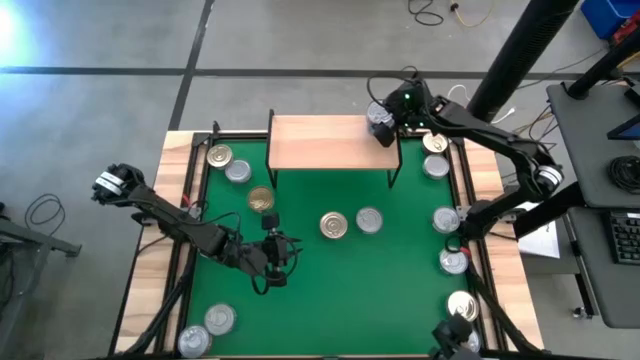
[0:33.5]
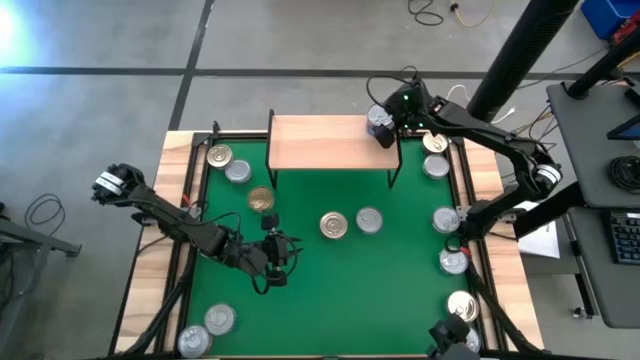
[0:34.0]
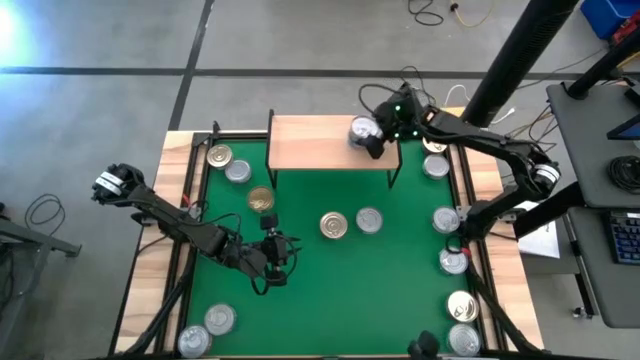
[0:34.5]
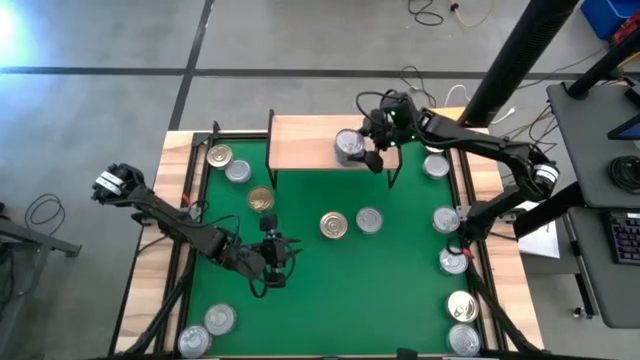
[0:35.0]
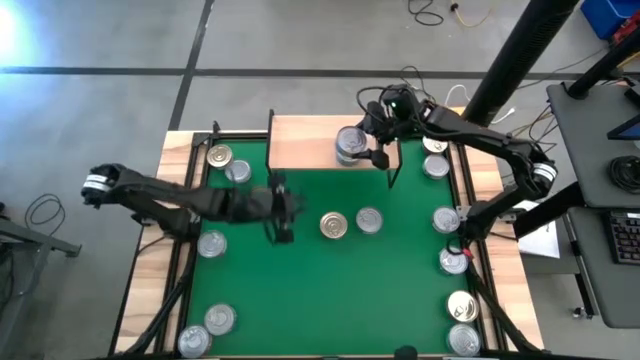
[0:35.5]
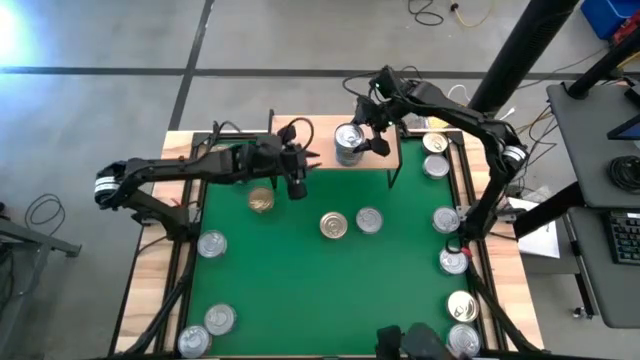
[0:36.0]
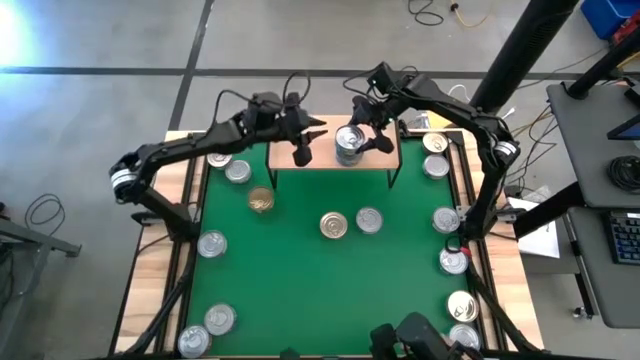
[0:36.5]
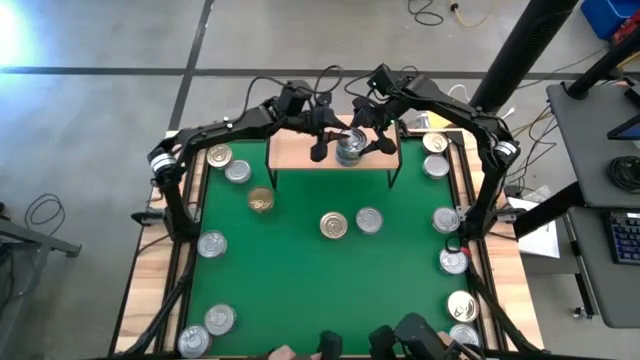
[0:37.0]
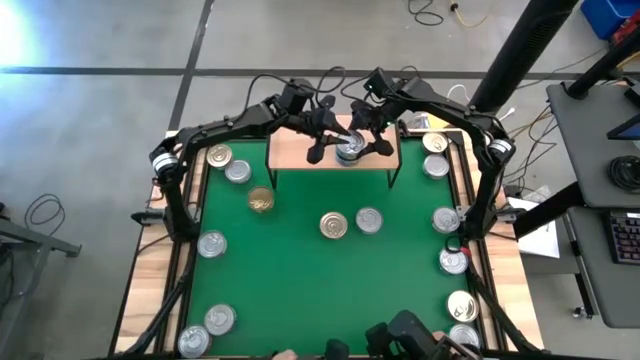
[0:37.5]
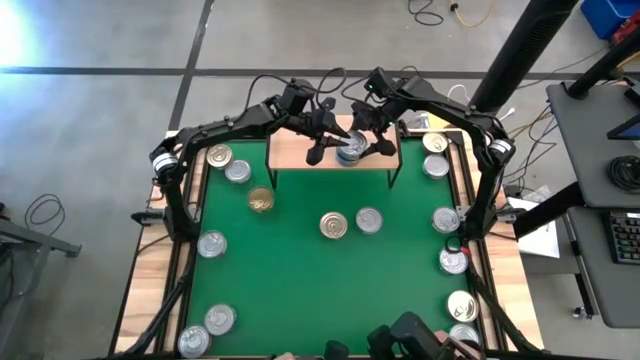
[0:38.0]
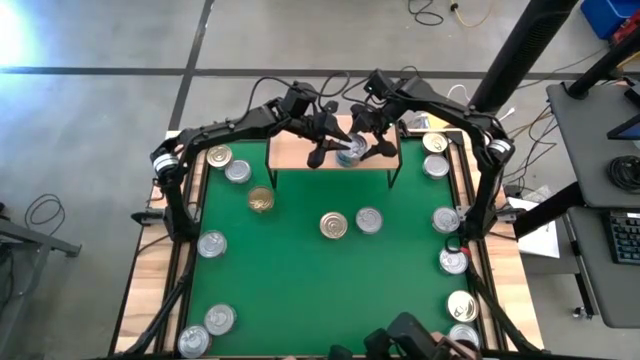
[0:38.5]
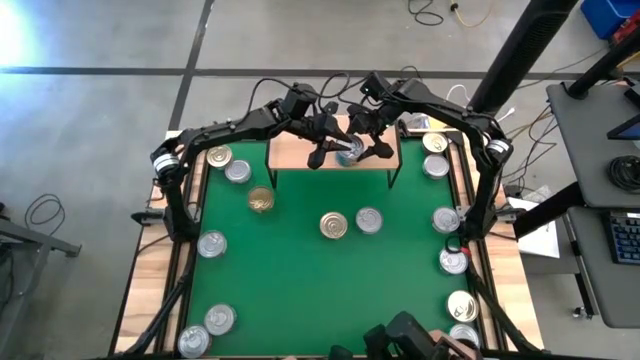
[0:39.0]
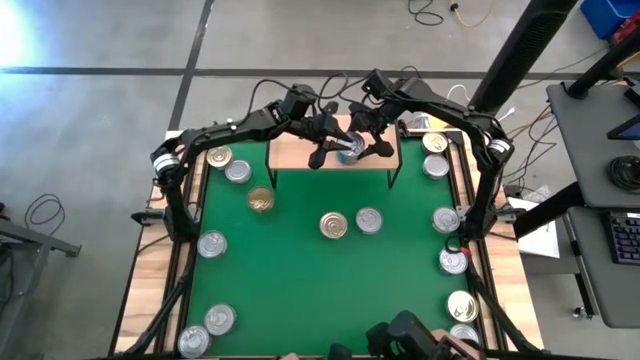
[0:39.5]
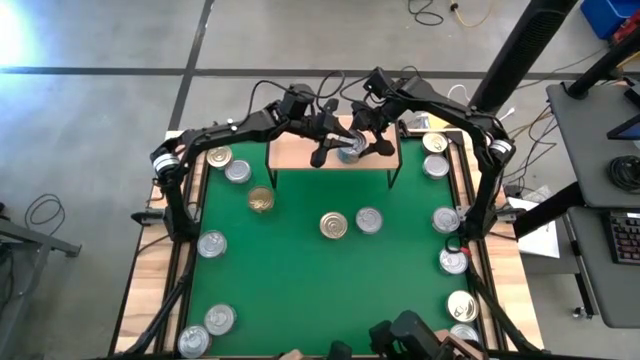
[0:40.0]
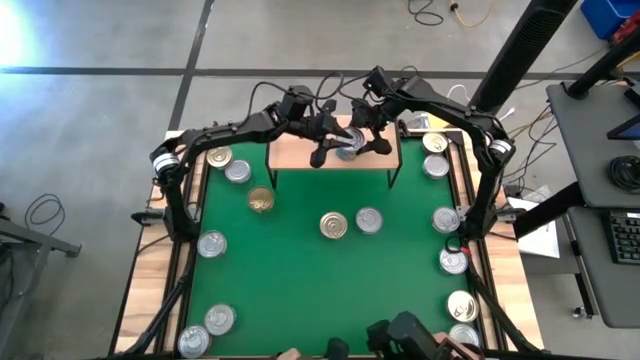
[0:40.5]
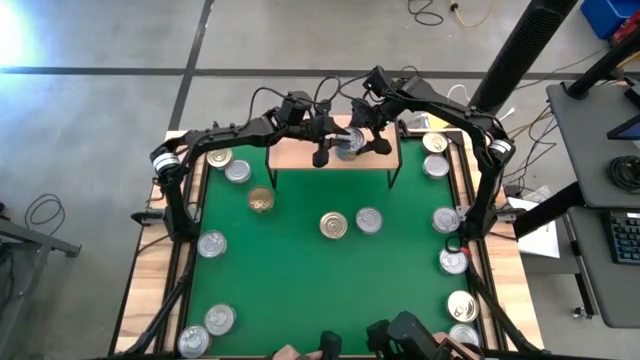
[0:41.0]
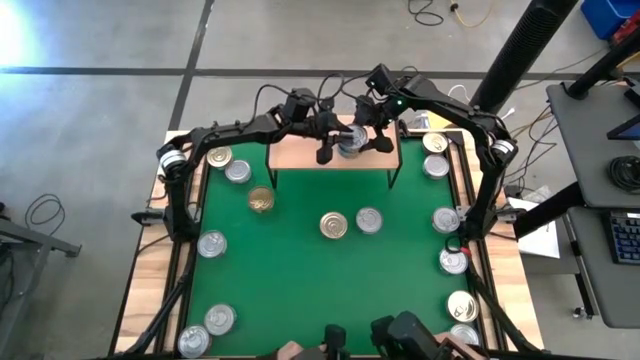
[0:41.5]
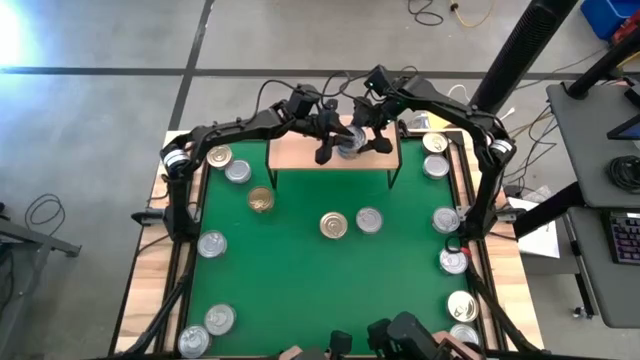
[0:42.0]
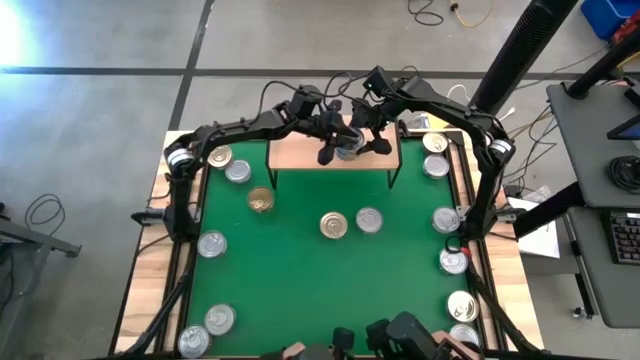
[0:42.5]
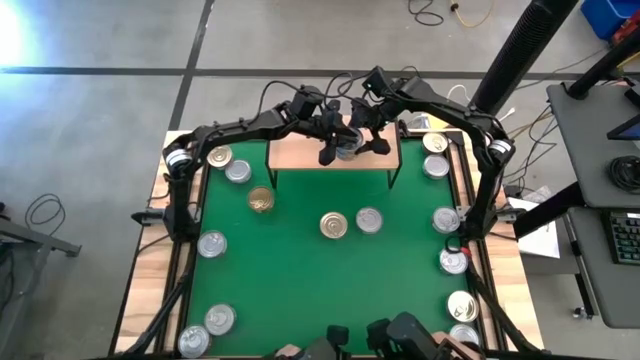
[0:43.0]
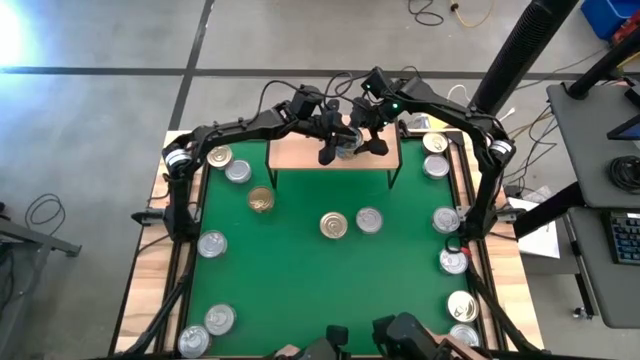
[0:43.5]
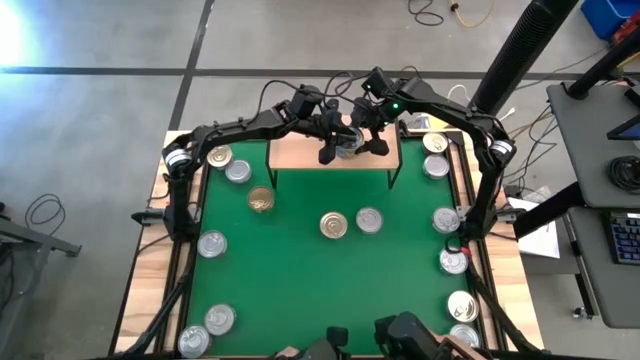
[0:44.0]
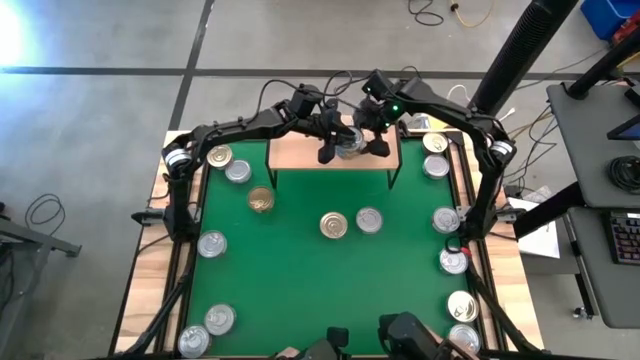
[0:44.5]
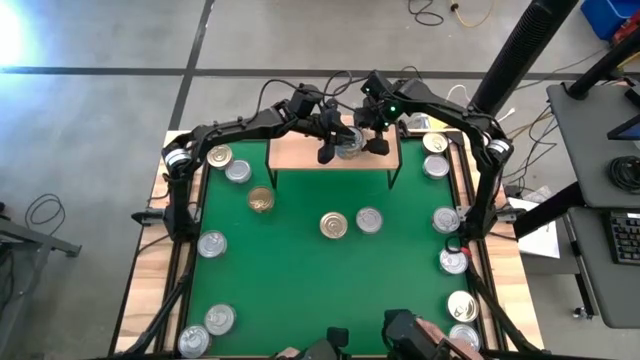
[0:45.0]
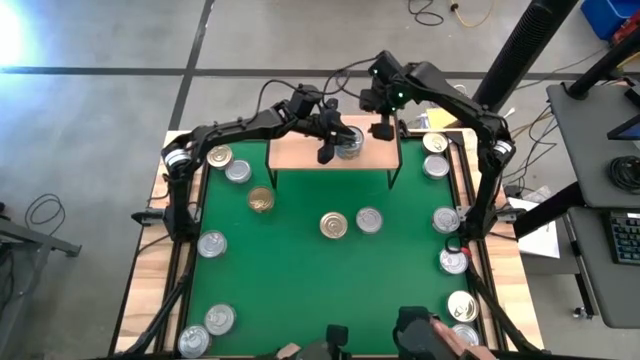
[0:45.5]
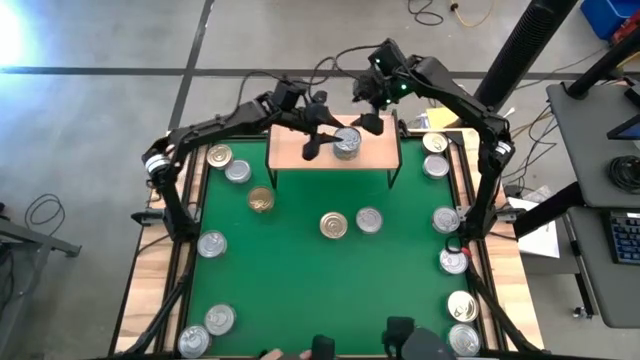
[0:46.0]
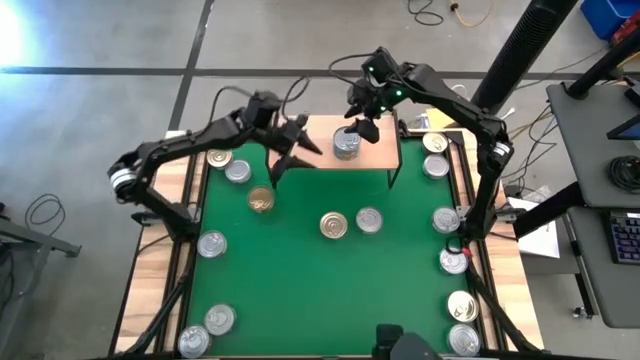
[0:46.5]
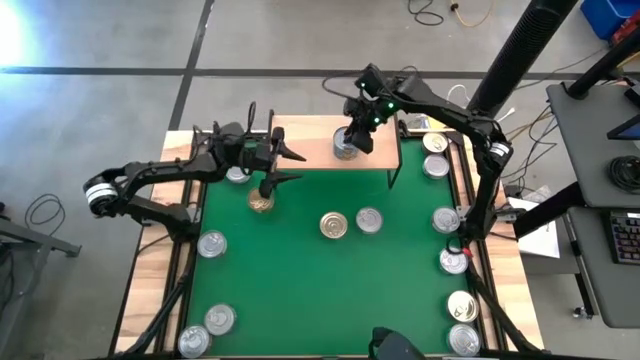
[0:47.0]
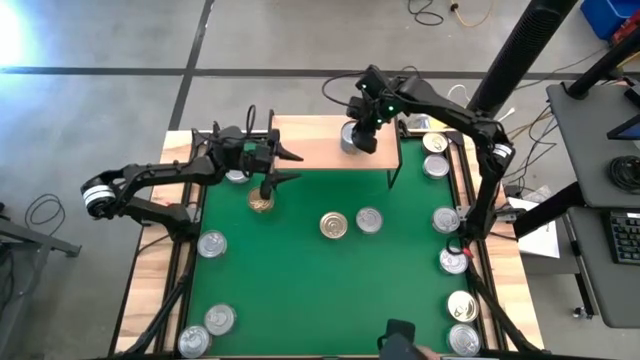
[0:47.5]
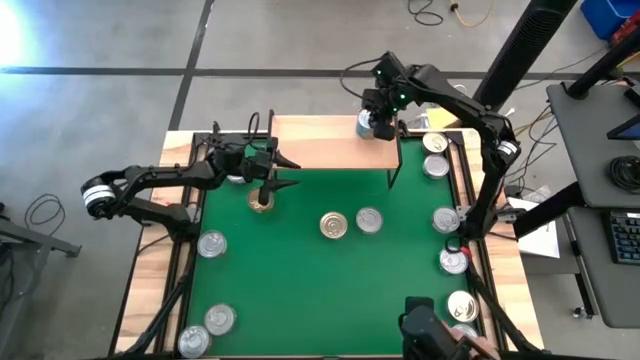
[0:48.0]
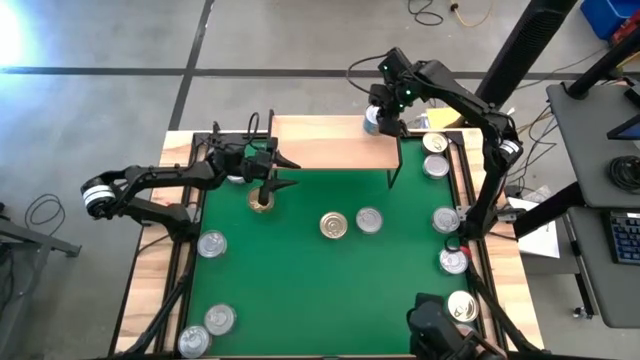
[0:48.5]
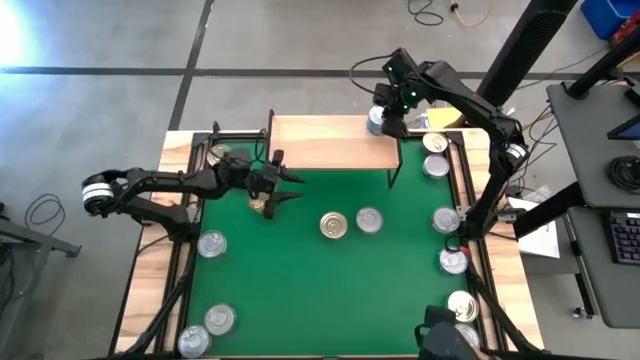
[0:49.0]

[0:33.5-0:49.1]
Task: Stack canned seafood by type on shelf
Stack the green blue tuna can on top of the green blue tuna can on the shelf

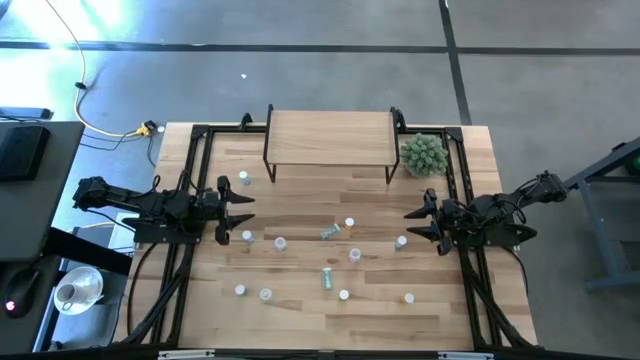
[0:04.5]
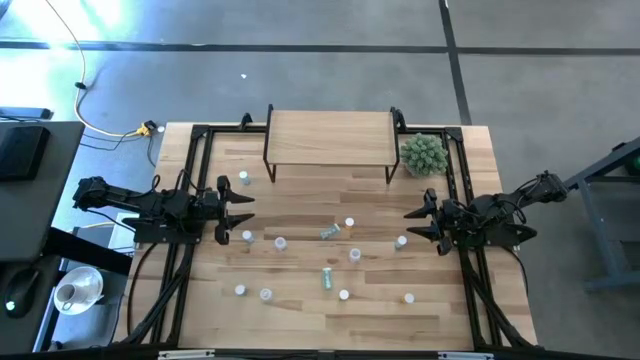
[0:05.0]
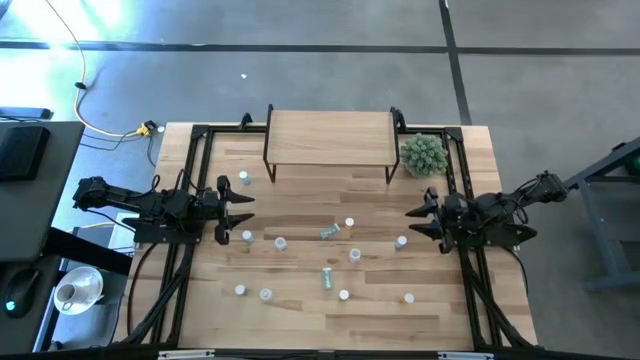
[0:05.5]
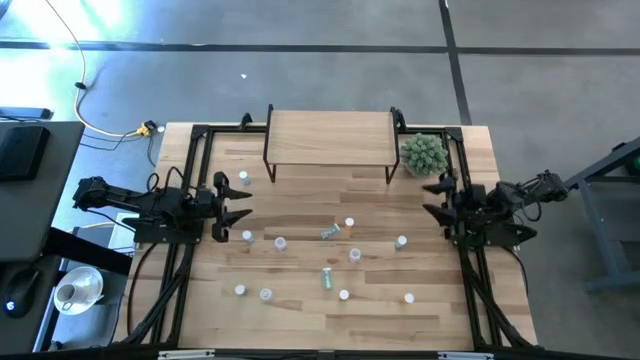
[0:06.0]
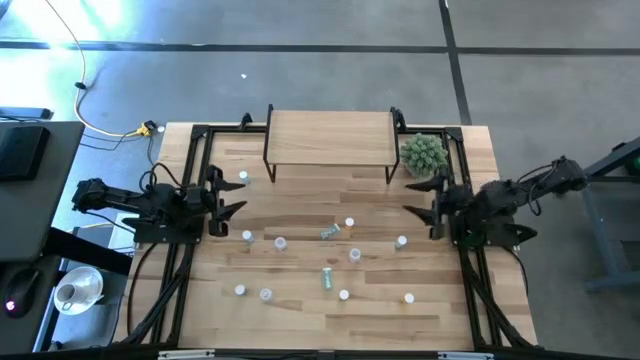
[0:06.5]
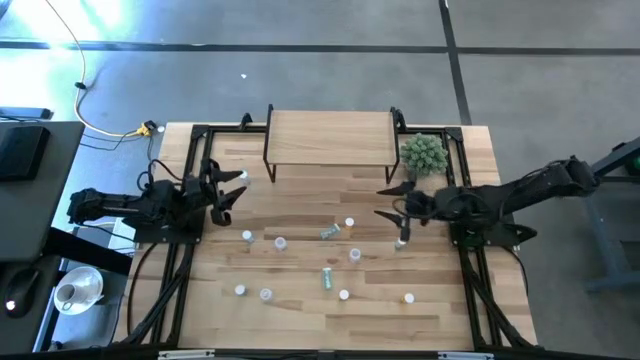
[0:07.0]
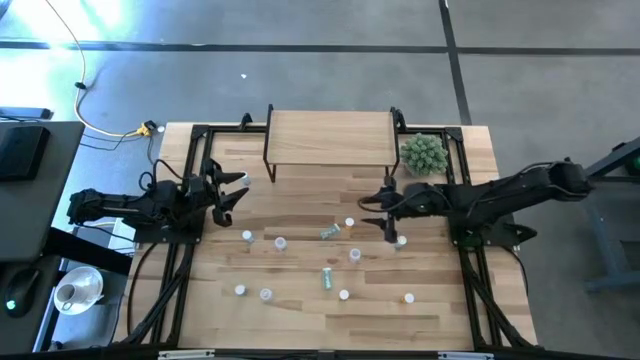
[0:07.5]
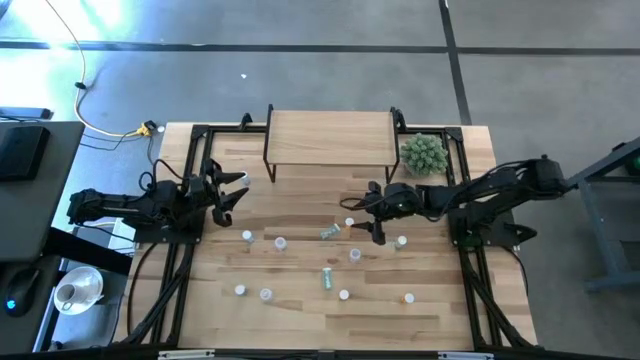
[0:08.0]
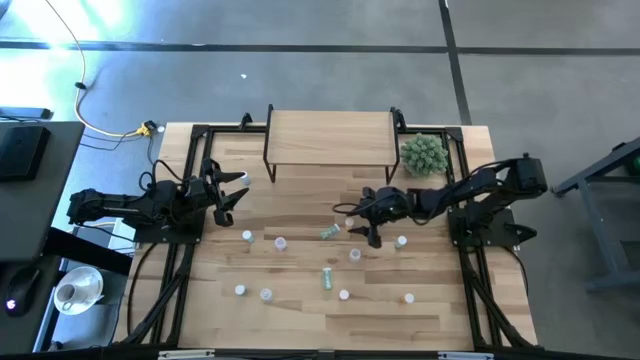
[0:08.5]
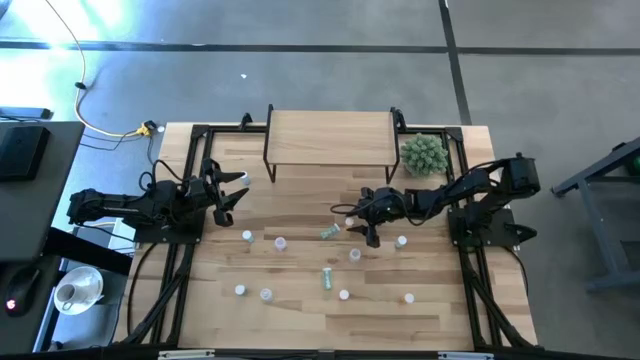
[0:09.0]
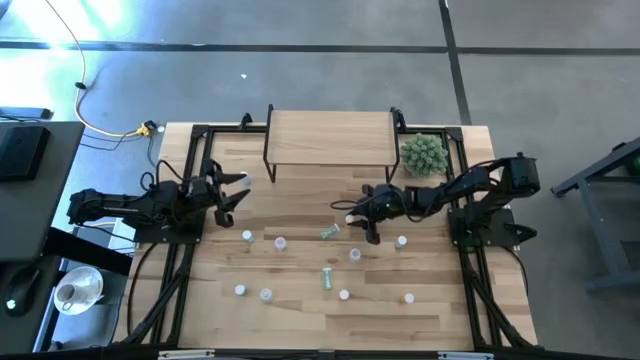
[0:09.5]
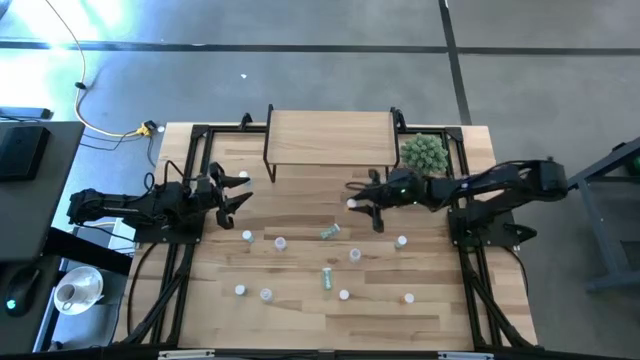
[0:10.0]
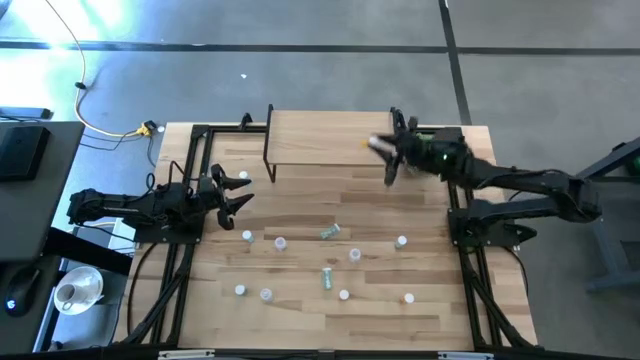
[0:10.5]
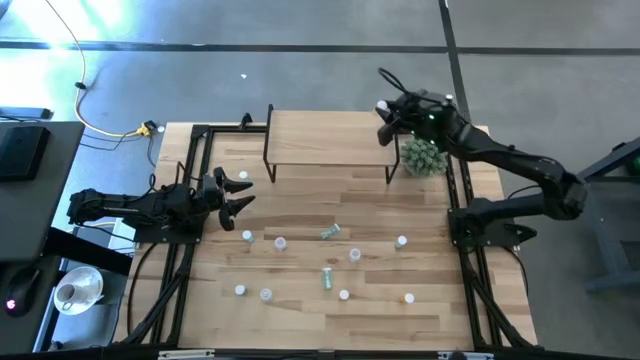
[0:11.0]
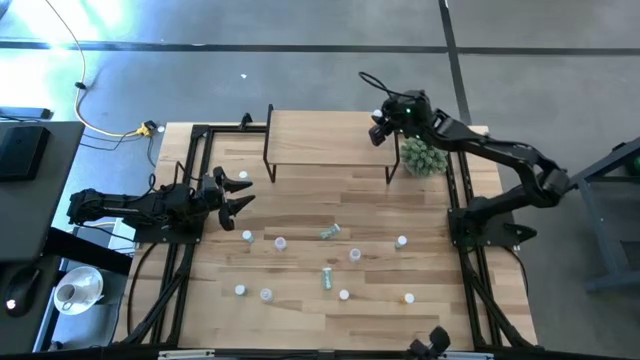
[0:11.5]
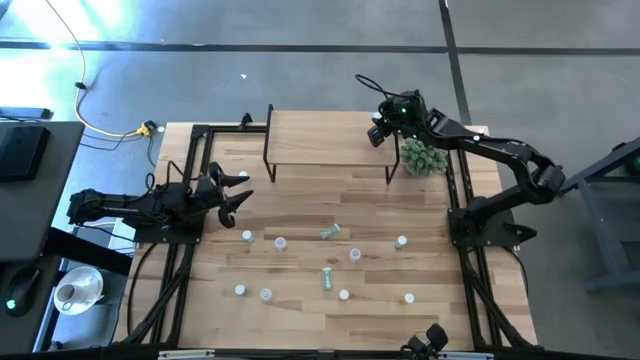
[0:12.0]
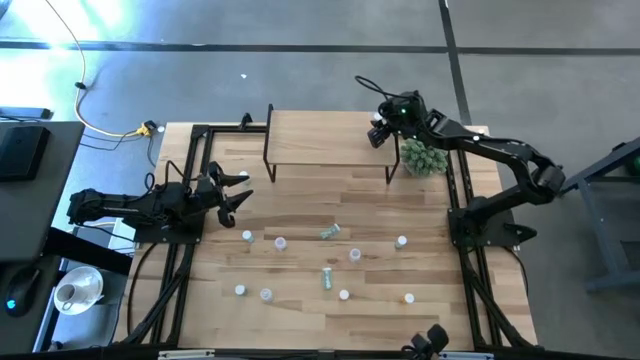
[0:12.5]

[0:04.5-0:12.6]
Task: Pick and place medicine bottles onto shelf by color
Put the top orange pill bottle on the shelf
